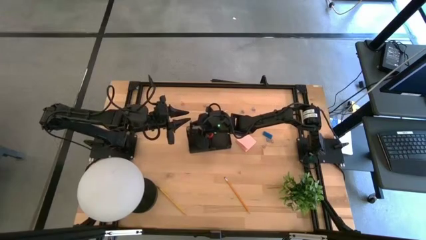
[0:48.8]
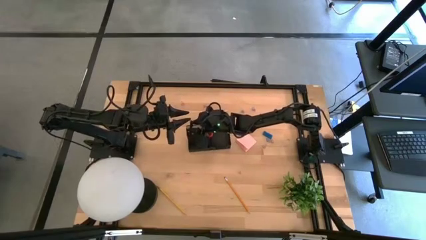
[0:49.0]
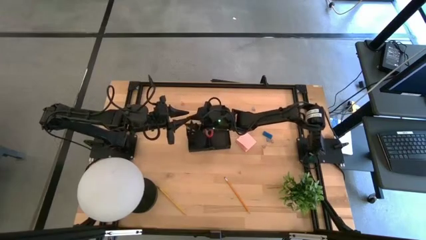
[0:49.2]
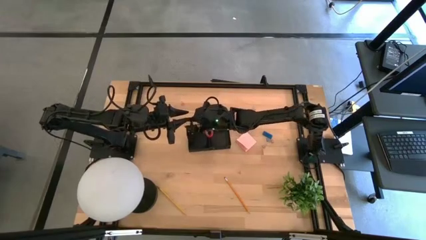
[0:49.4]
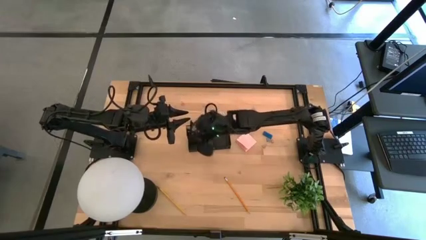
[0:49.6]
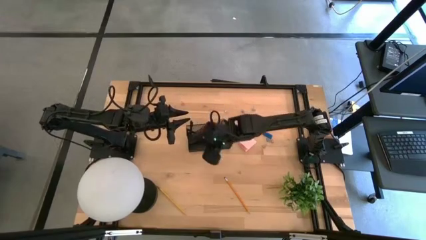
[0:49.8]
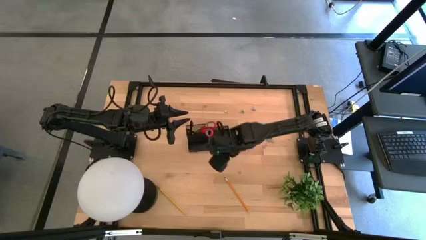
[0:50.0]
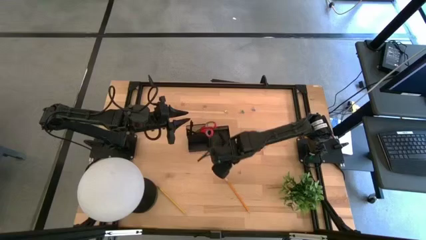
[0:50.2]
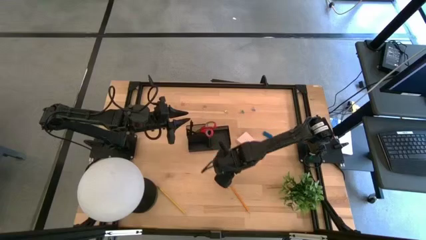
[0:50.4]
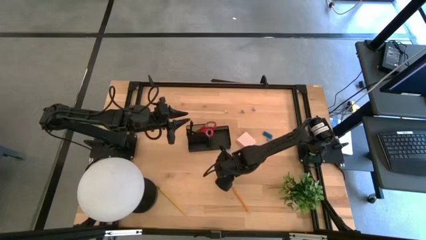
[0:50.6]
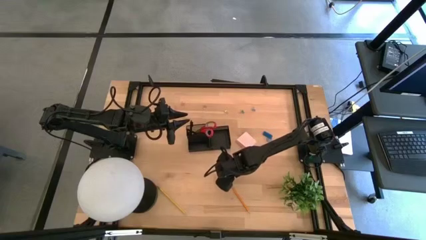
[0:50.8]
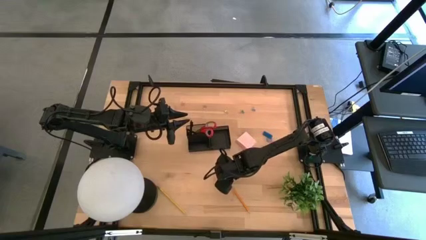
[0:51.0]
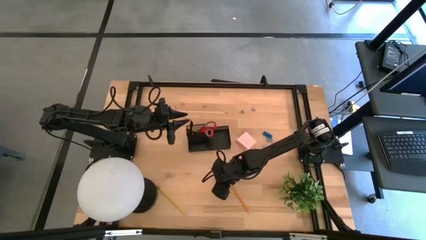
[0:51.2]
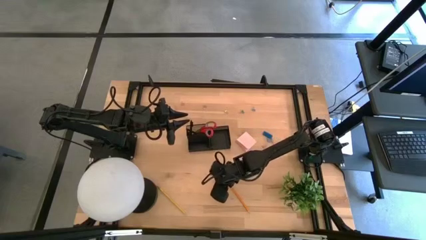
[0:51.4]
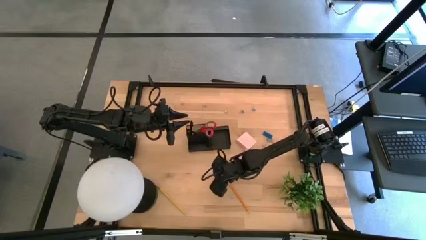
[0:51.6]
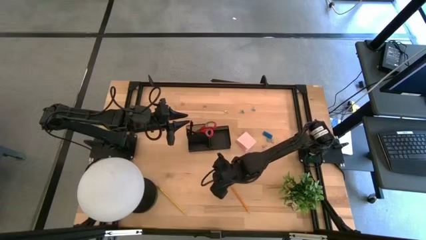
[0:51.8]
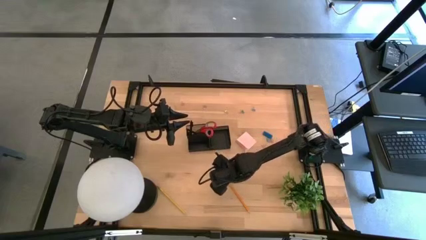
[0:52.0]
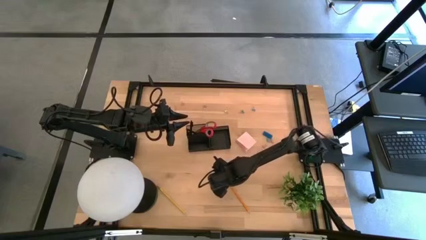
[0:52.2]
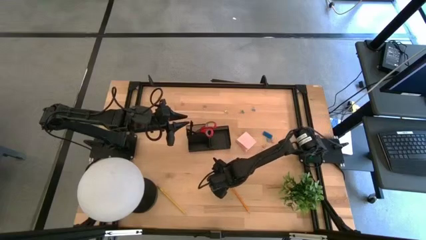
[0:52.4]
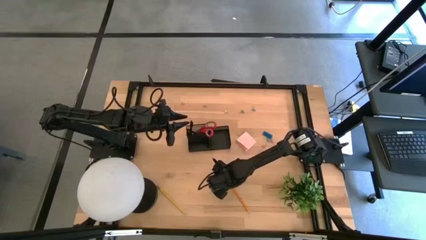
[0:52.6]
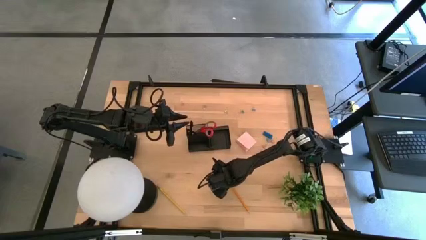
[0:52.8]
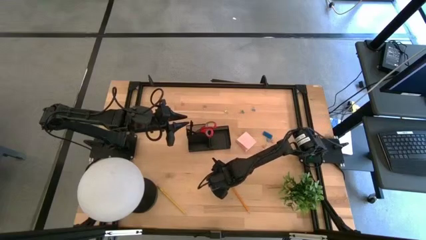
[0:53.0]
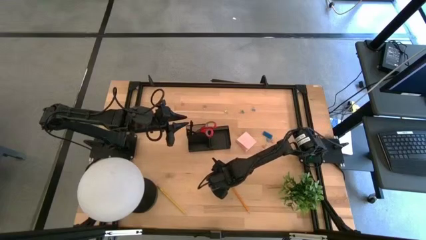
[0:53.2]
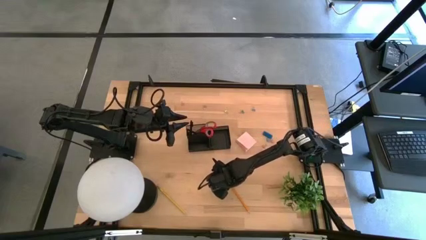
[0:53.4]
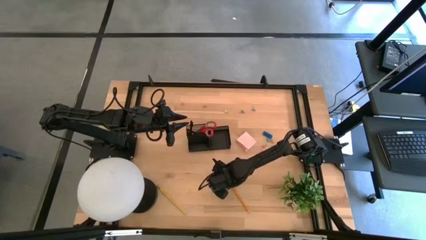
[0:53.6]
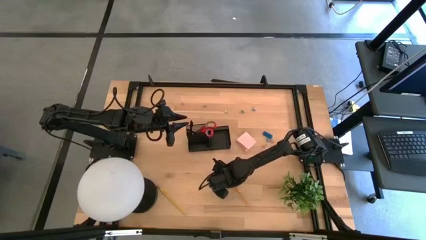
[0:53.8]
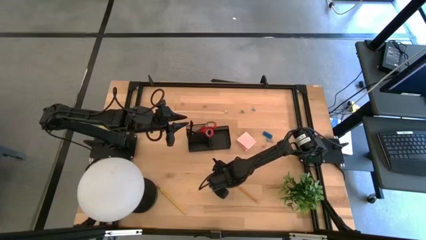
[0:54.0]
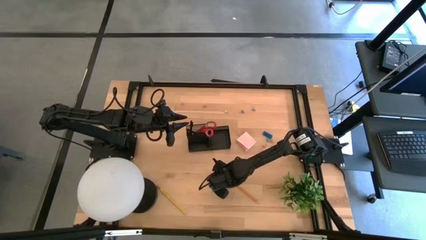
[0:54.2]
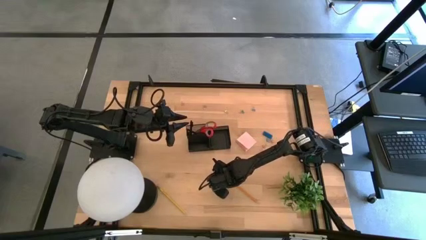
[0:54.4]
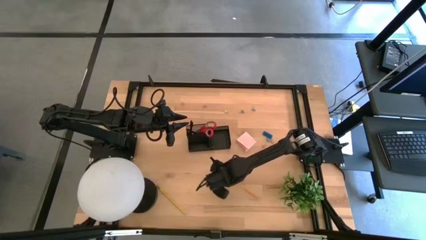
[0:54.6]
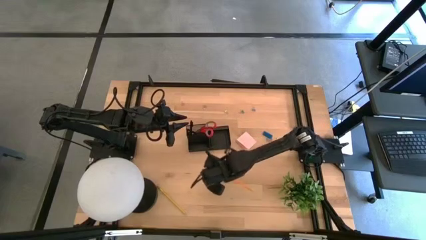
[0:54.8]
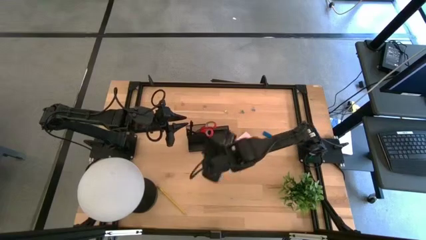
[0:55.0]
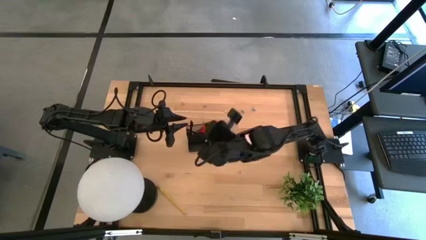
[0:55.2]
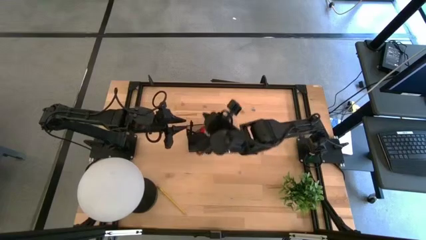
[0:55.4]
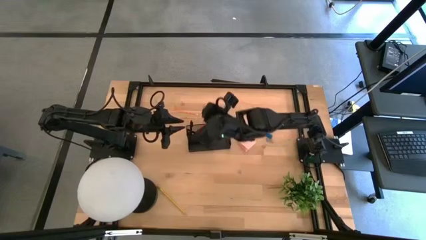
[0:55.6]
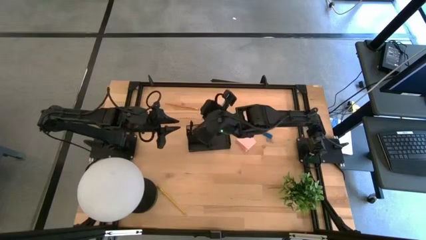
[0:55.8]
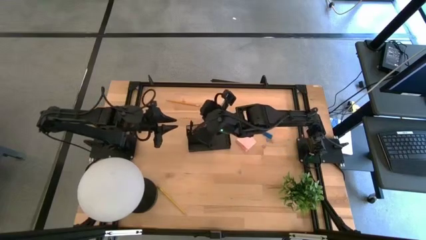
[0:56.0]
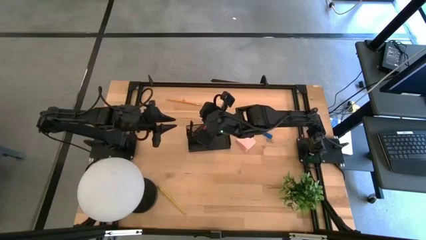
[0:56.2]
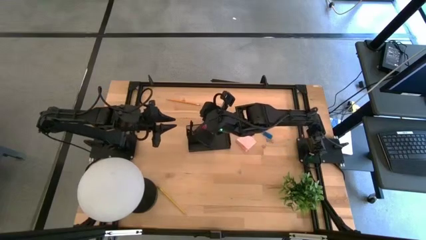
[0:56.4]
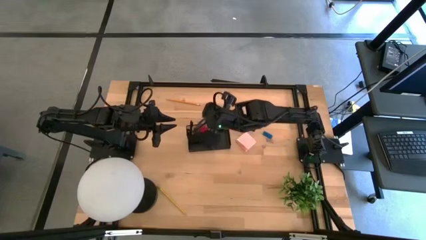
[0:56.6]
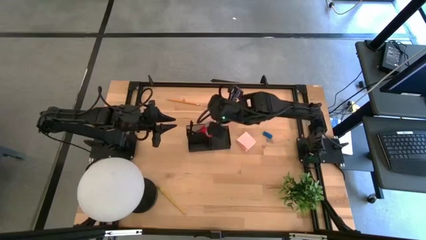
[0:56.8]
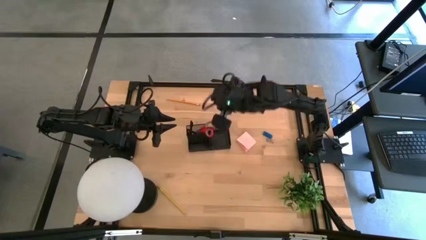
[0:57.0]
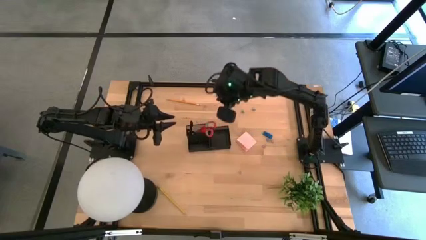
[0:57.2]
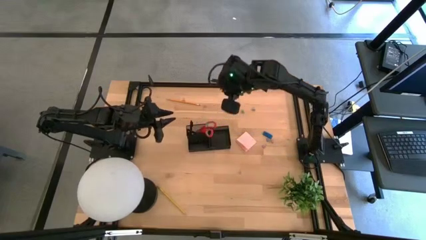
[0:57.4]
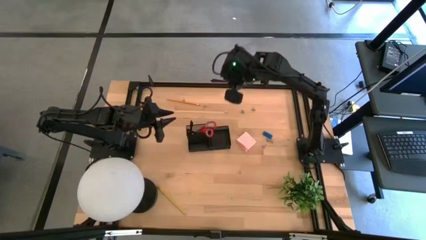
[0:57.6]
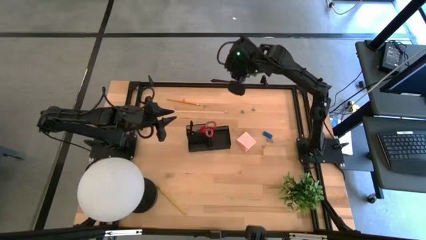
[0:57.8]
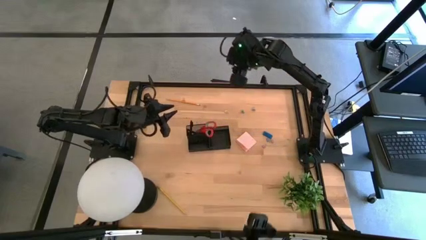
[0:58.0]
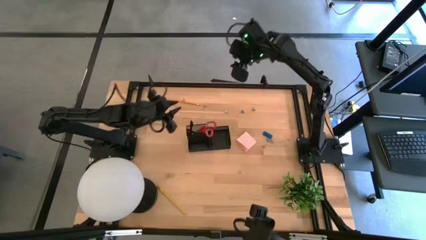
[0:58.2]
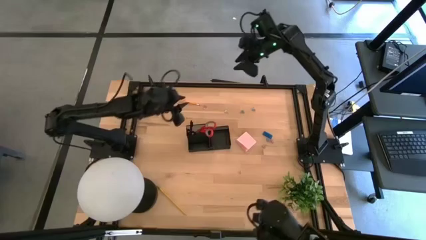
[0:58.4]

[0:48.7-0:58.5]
Task: Pick and place office supplies into organizer
Put the orange pencil into the desk organizer

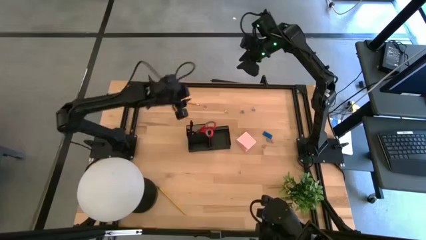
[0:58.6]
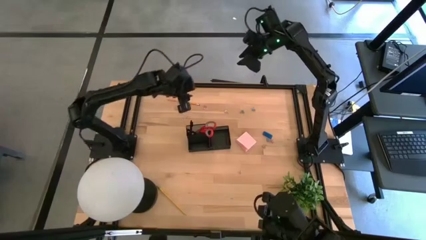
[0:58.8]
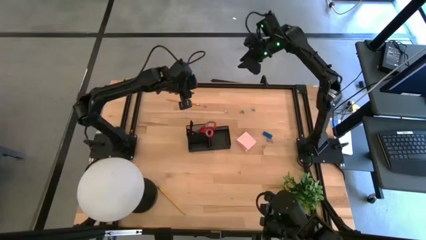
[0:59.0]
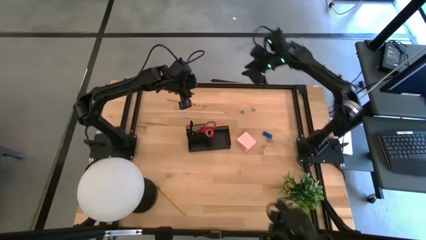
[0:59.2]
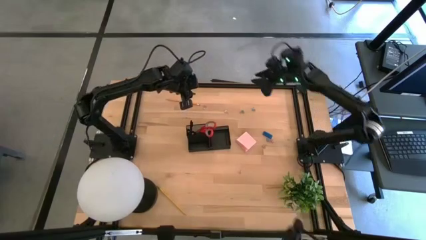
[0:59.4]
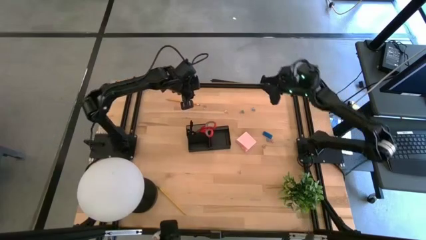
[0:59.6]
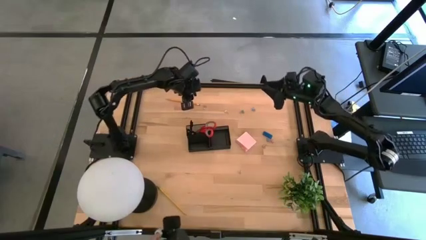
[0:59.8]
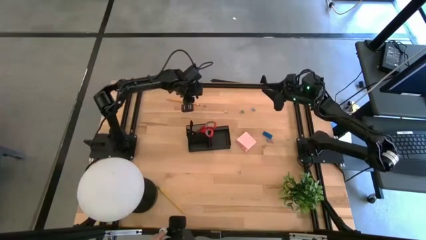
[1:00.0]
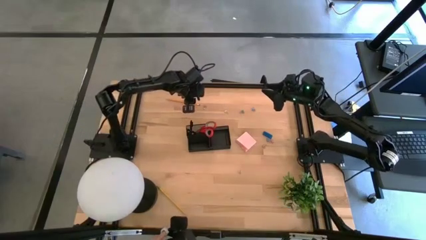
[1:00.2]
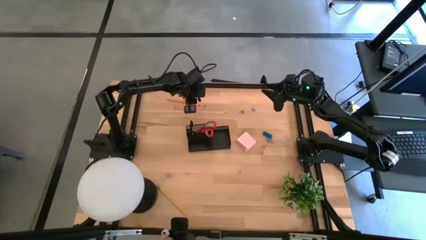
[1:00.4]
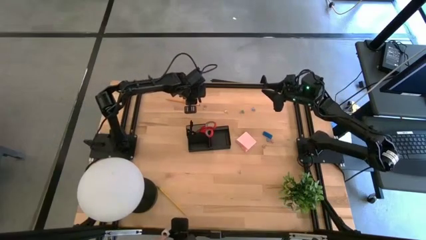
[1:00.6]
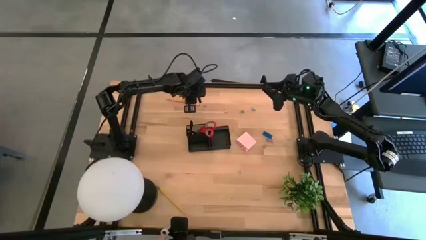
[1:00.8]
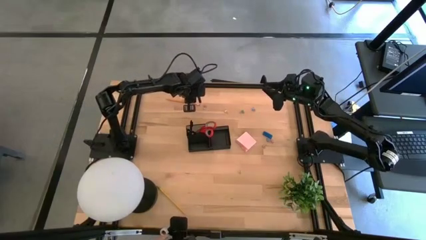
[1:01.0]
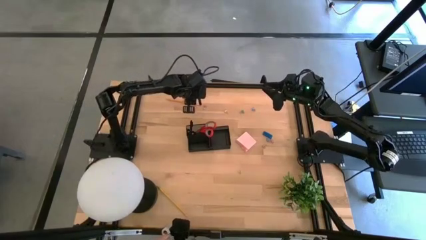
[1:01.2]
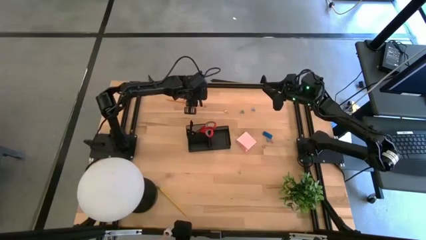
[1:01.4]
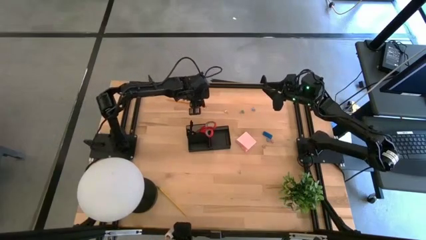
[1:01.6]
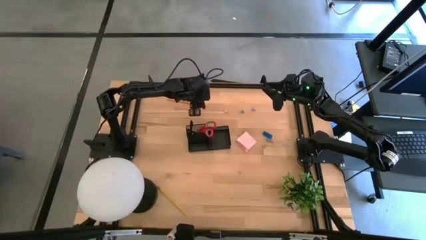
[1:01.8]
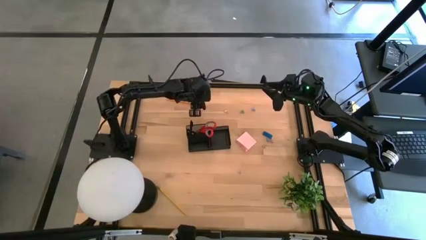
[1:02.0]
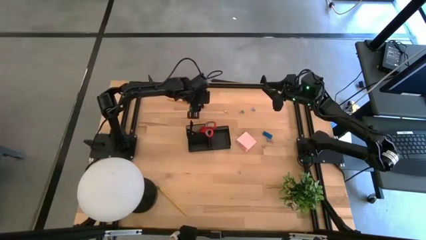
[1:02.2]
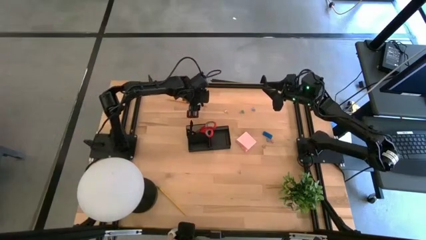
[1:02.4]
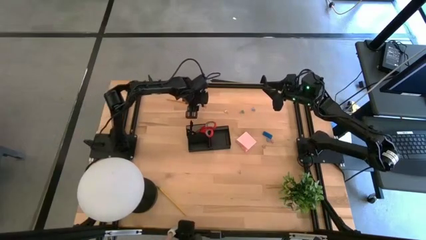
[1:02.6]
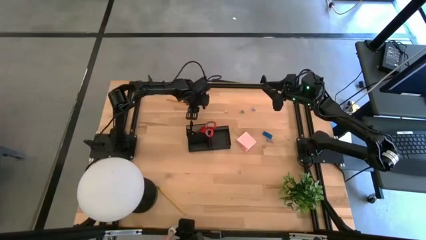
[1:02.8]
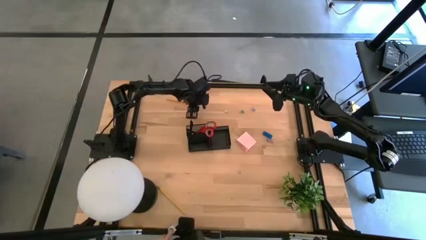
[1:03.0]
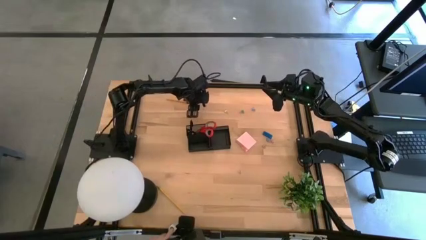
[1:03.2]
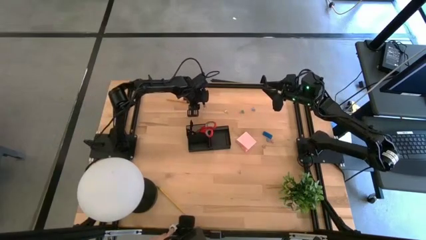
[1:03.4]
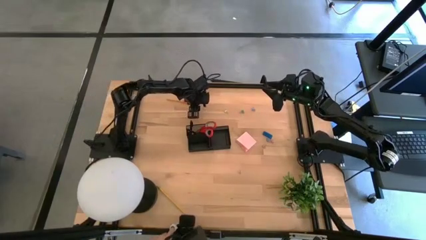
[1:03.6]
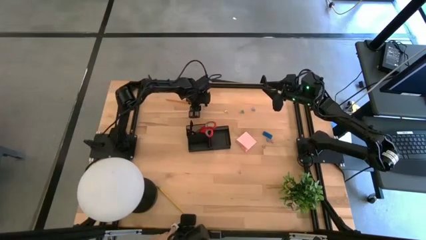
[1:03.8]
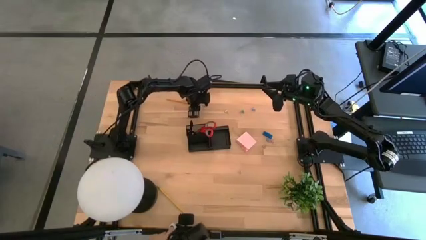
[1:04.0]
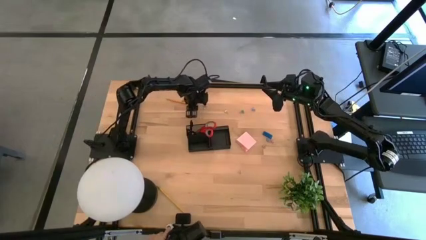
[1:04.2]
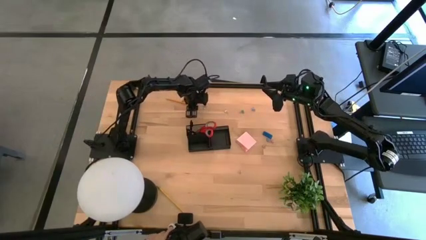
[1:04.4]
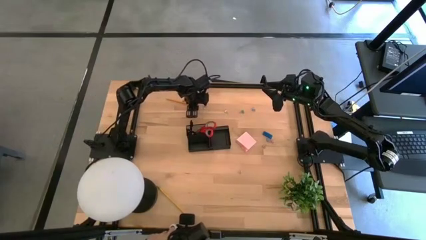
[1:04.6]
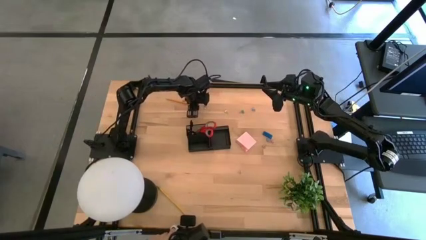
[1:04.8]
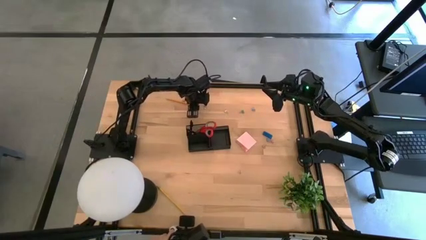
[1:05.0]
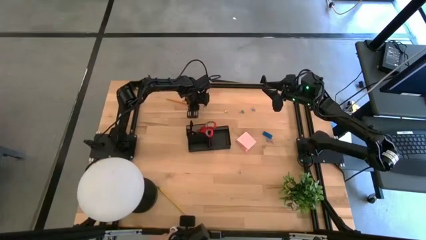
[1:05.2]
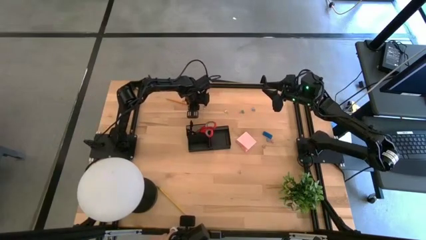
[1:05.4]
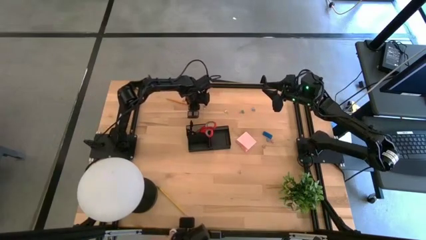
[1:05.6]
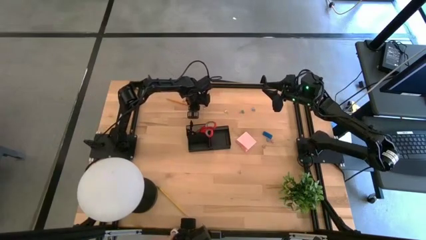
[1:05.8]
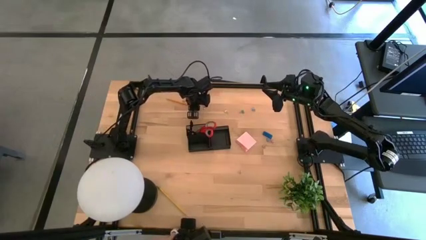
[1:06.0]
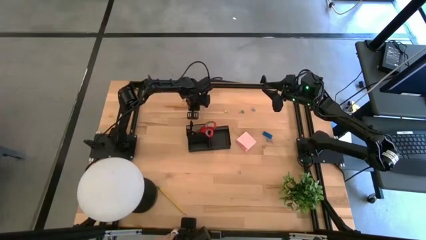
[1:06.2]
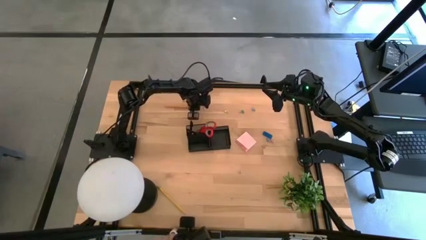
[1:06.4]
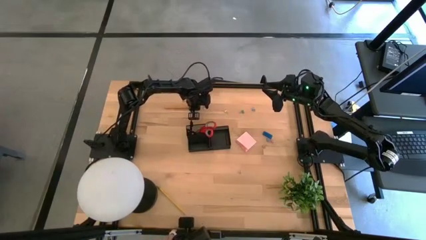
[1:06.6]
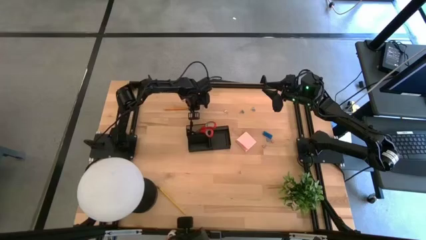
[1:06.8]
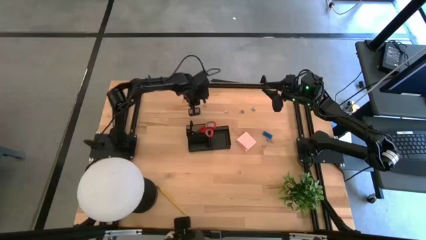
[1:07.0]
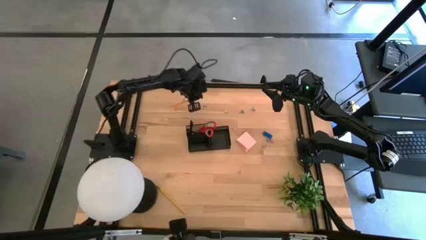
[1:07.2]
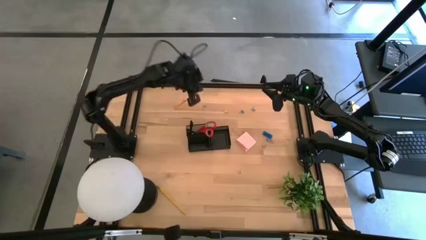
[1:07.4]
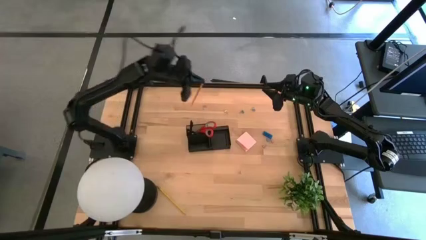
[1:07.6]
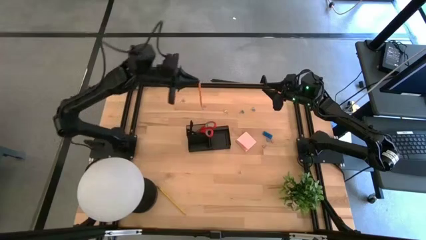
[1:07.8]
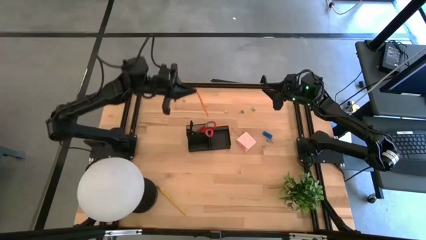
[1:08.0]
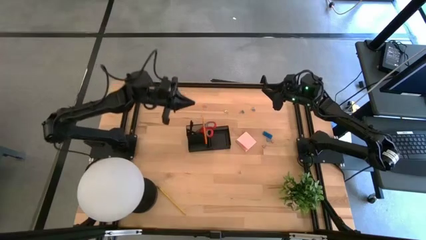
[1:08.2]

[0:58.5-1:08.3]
Put the orange pencil into the desk organizer
